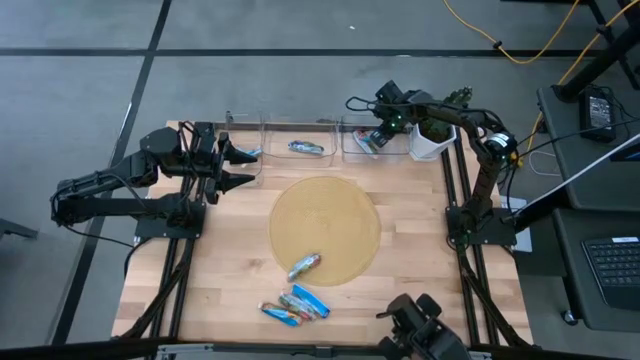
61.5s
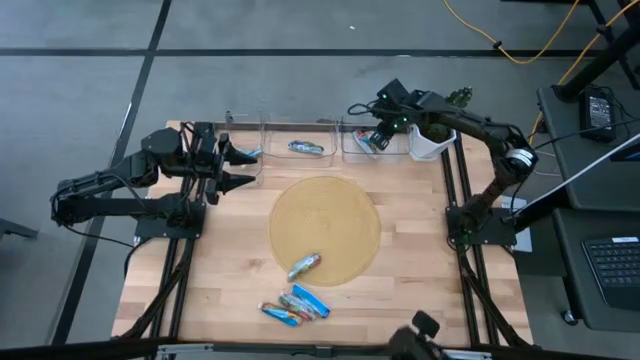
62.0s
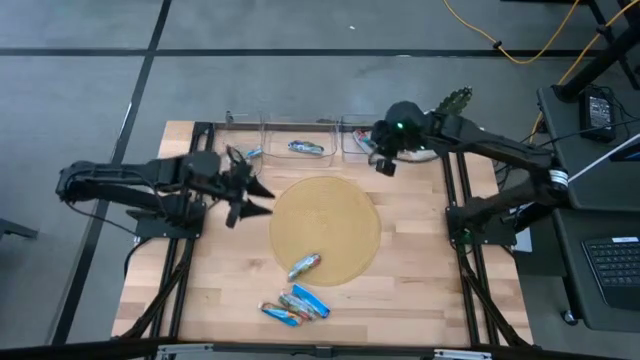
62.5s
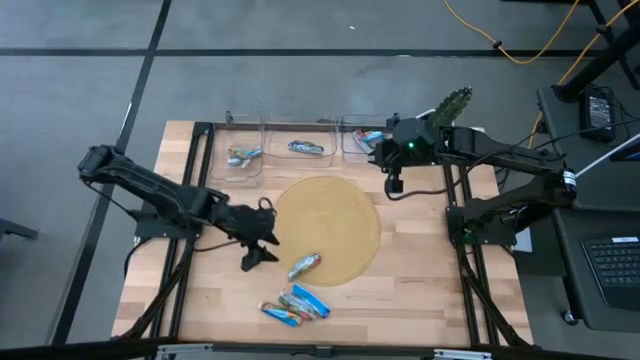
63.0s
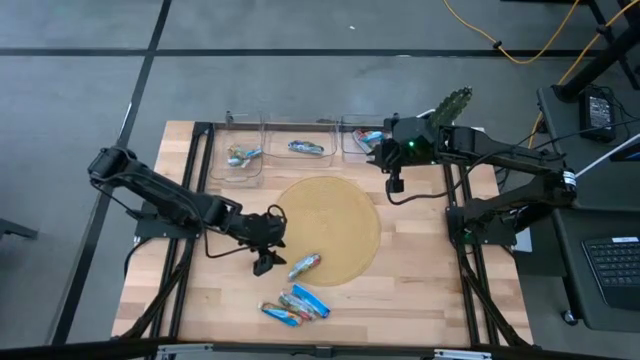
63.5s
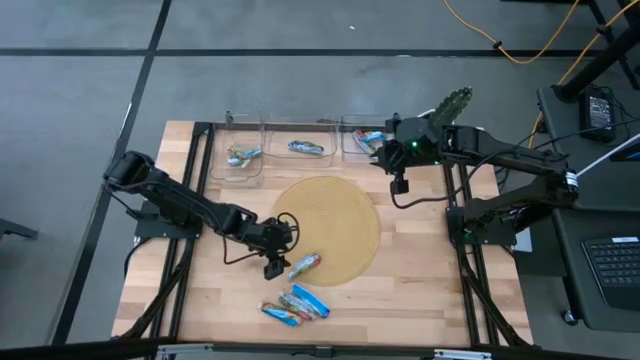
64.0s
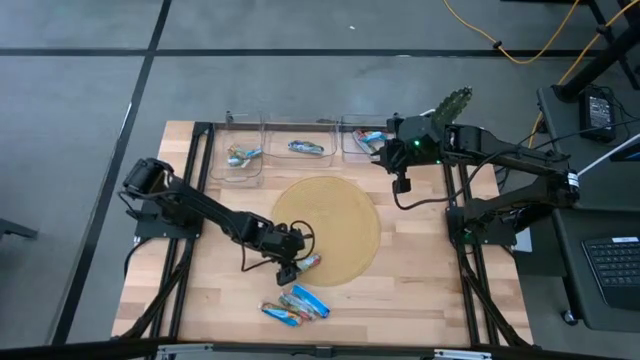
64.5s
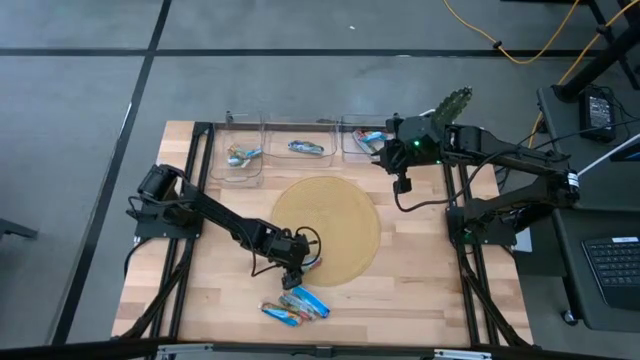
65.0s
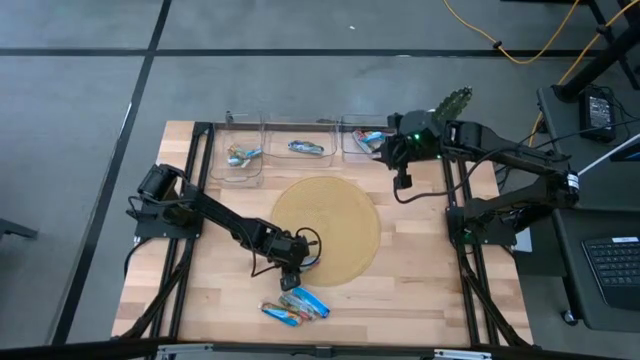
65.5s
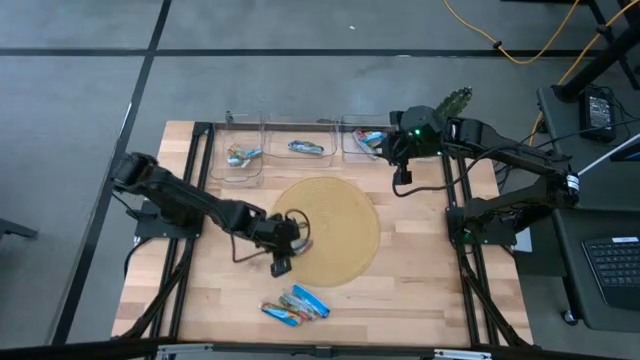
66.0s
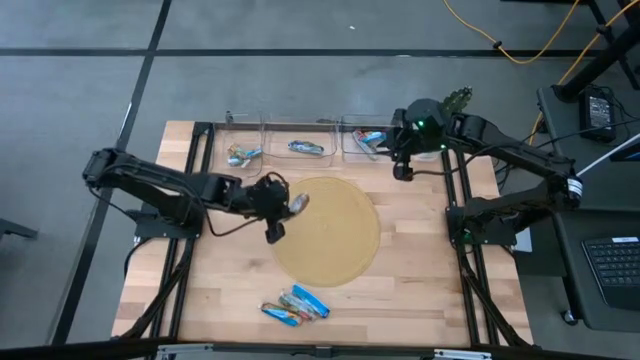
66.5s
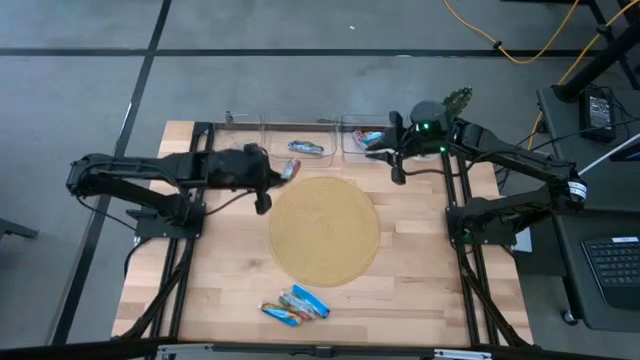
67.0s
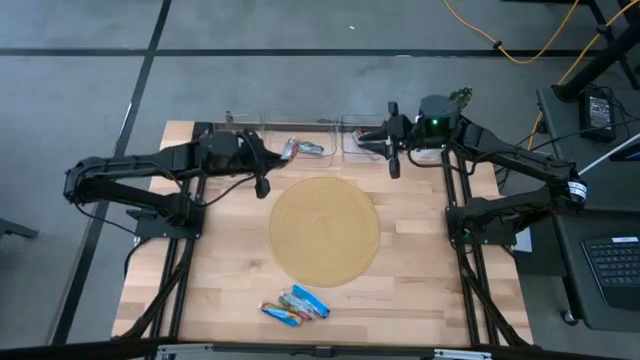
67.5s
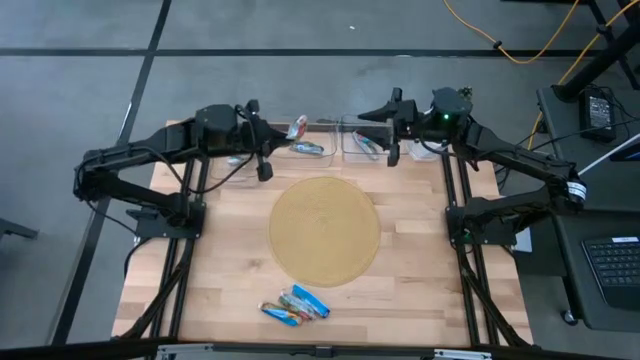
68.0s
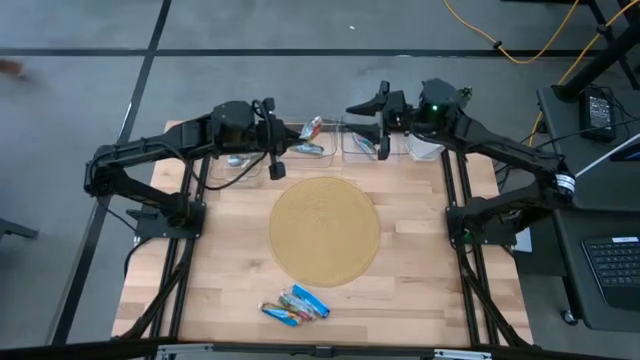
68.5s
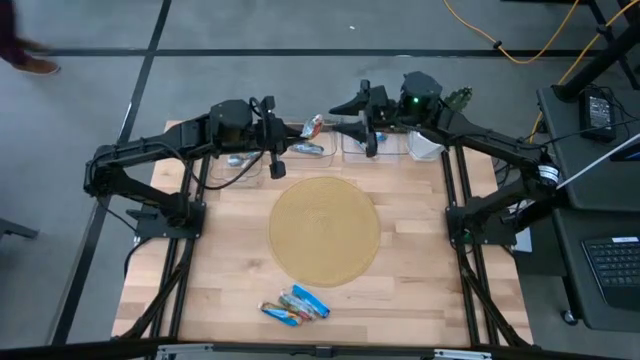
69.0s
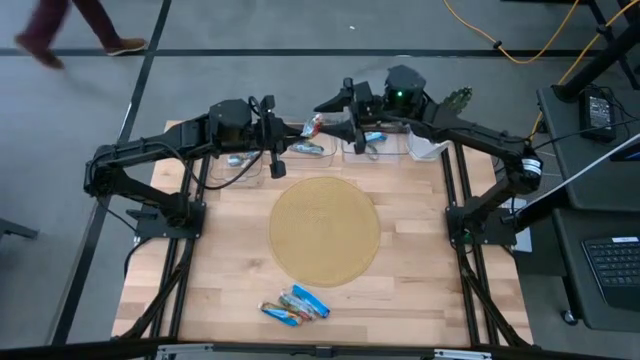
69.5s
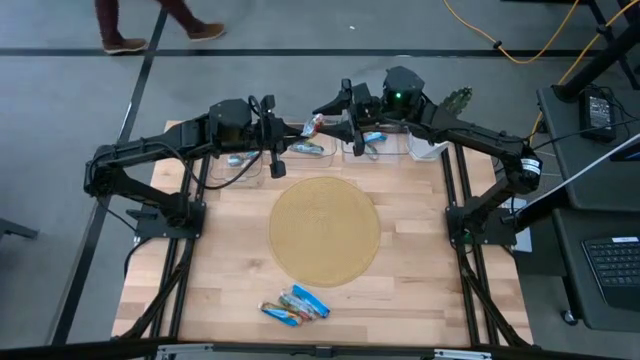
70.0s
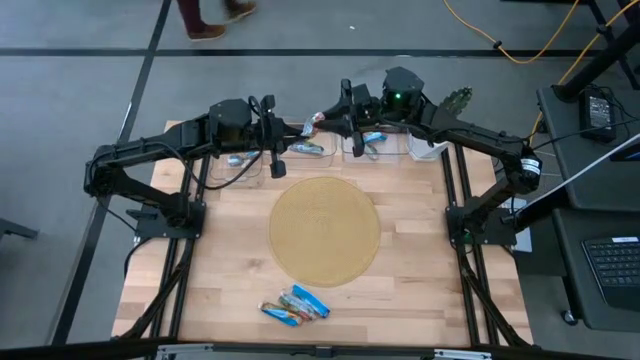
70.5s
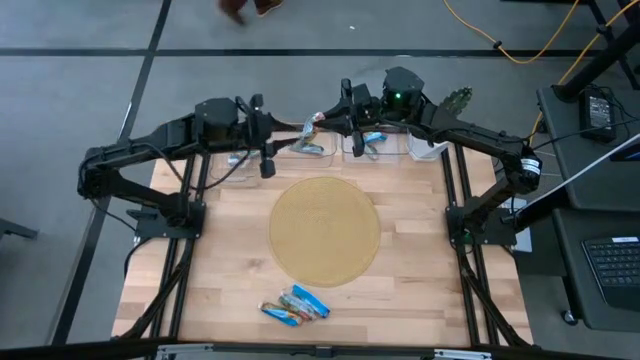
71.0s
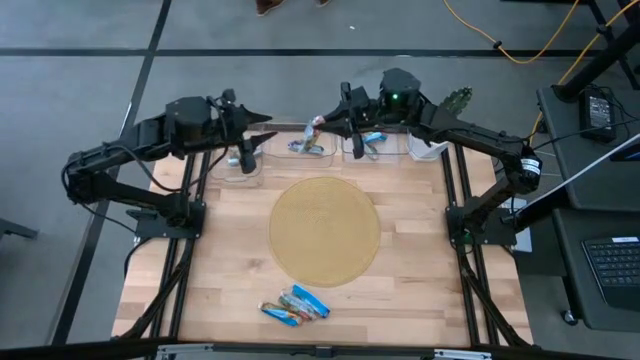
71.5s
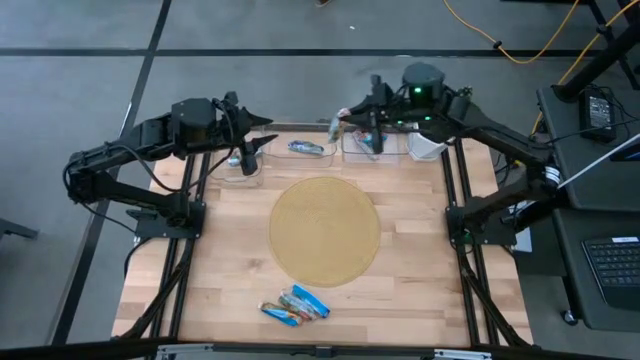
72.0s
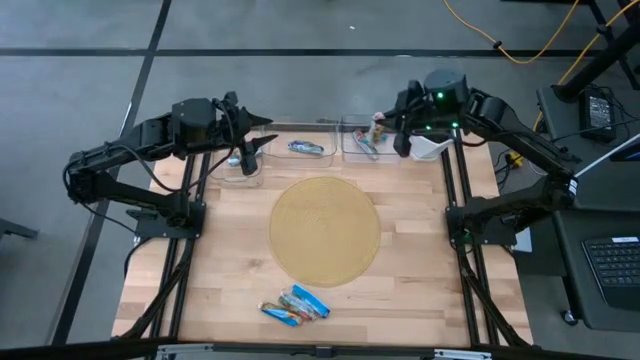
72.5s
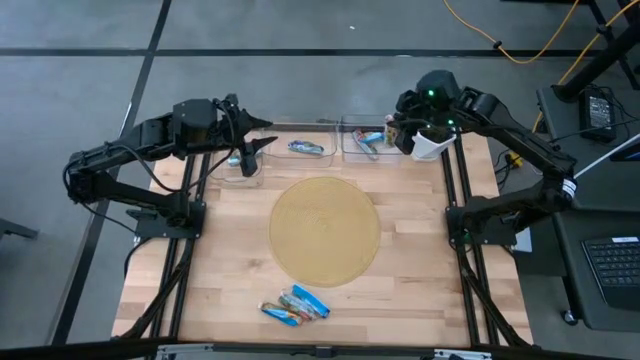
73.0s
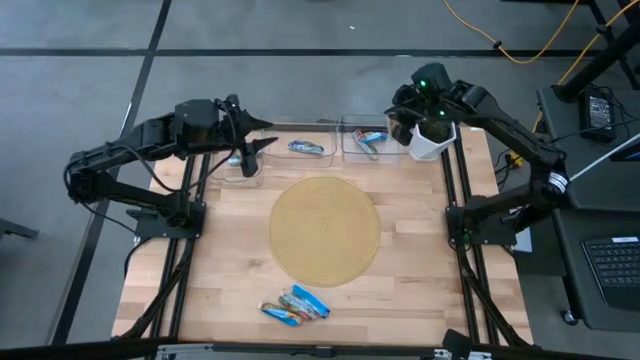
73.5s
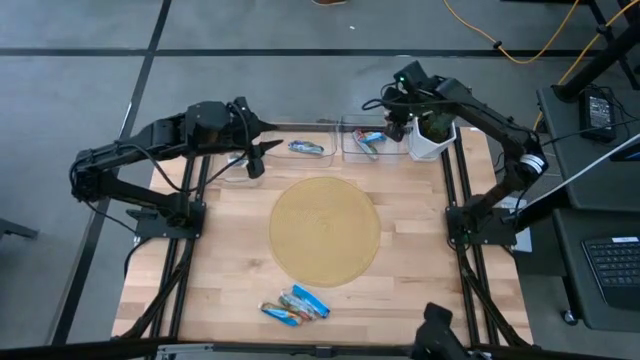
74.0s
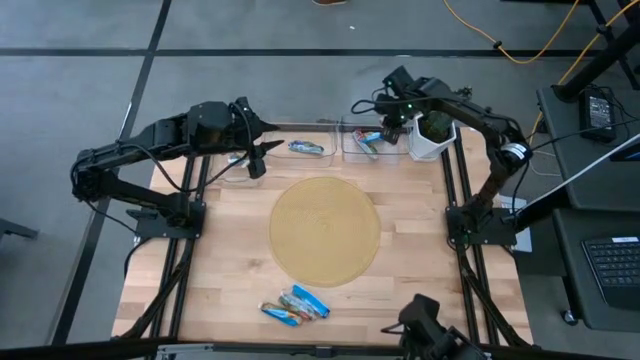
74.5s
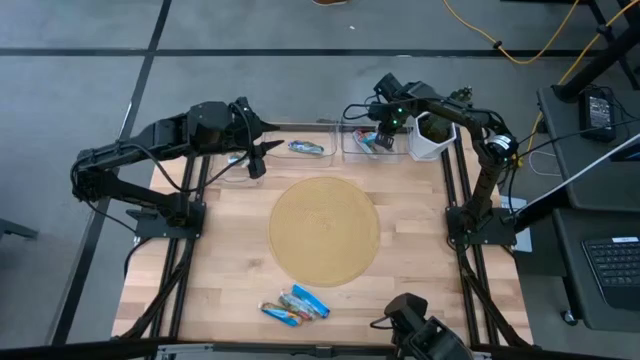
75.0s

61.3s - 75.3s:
Task: Pick and place Granola Bars by type
Put the red granola bar into the right transparent bin
